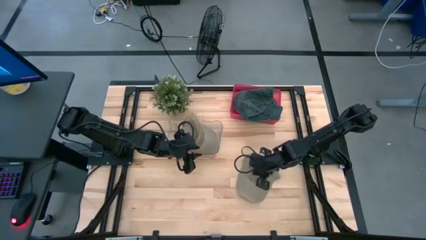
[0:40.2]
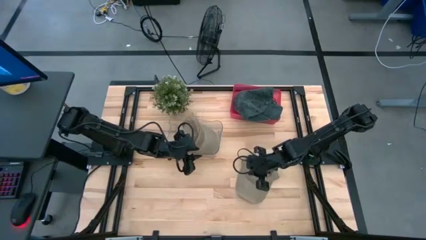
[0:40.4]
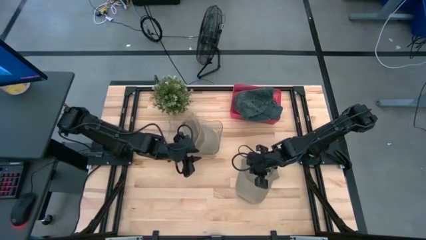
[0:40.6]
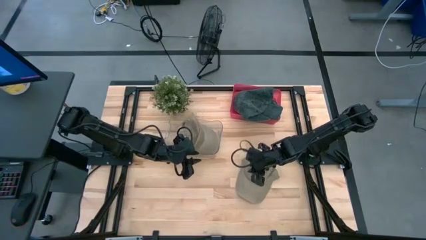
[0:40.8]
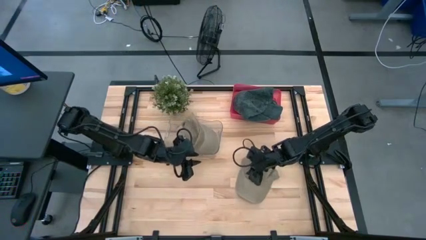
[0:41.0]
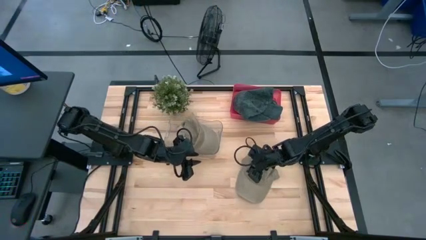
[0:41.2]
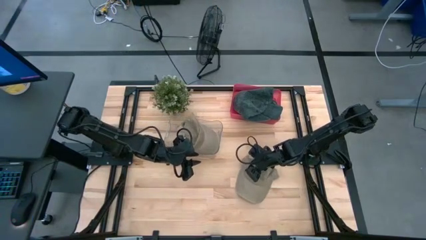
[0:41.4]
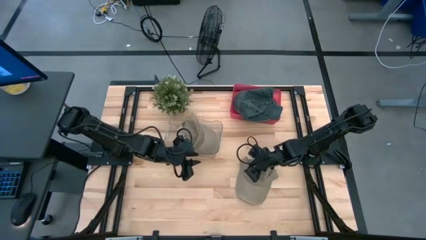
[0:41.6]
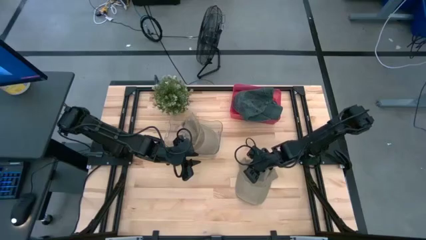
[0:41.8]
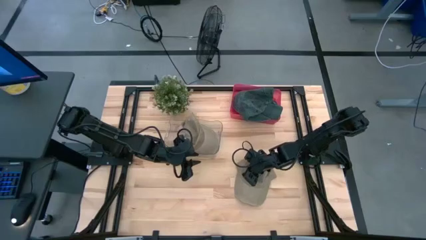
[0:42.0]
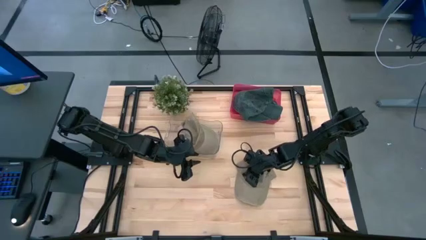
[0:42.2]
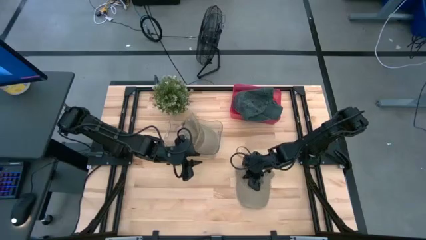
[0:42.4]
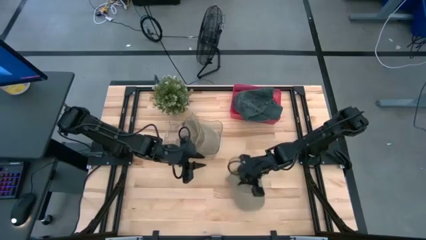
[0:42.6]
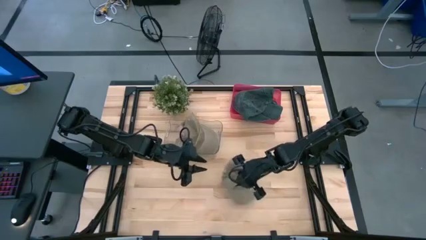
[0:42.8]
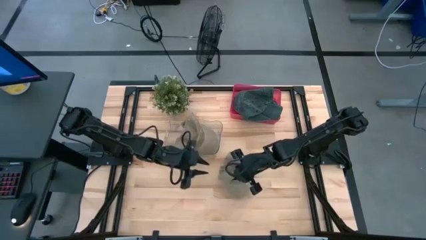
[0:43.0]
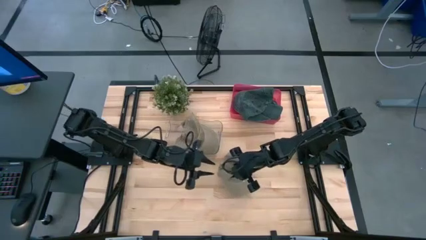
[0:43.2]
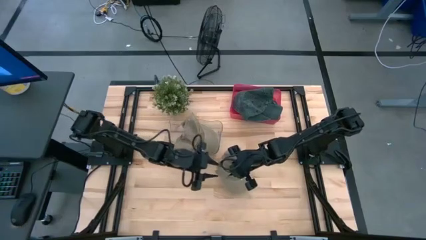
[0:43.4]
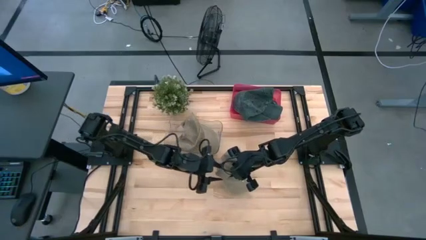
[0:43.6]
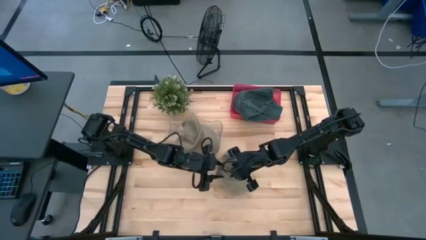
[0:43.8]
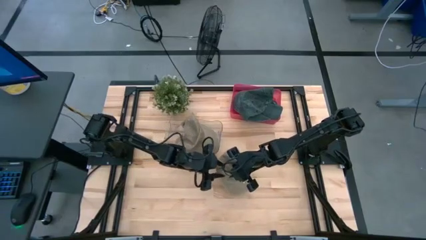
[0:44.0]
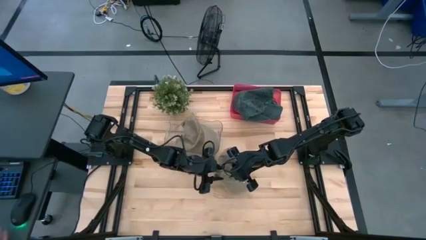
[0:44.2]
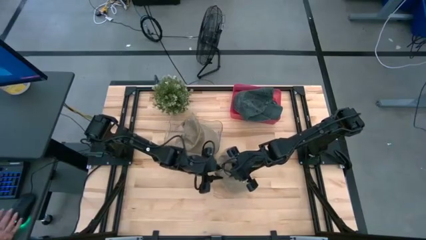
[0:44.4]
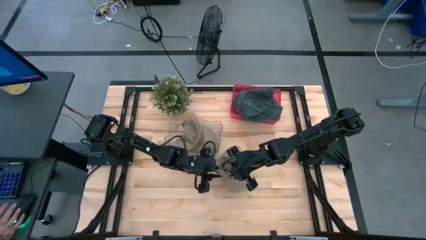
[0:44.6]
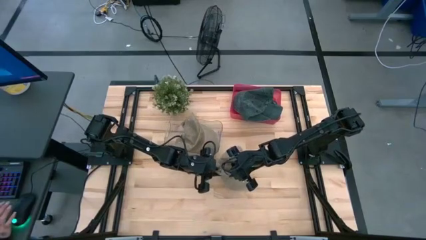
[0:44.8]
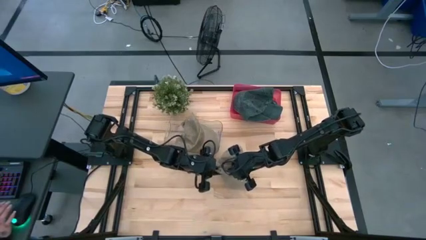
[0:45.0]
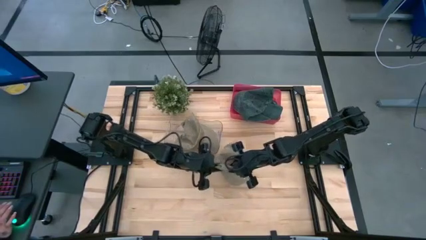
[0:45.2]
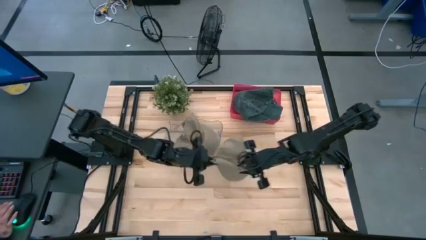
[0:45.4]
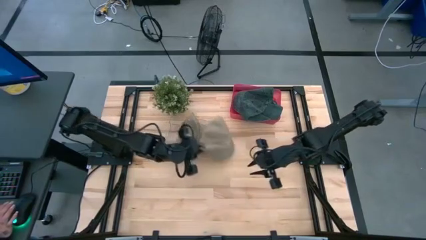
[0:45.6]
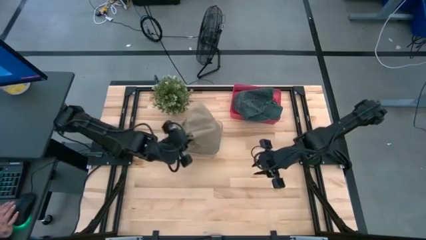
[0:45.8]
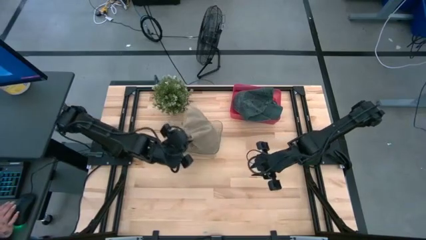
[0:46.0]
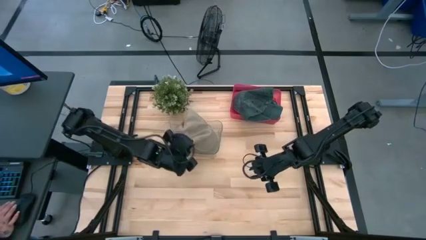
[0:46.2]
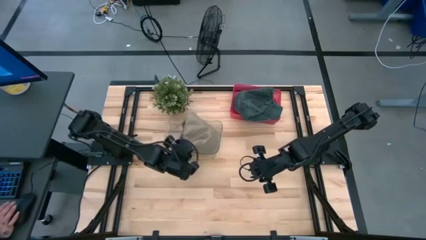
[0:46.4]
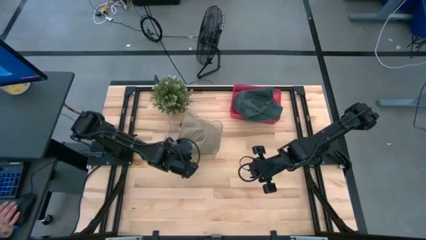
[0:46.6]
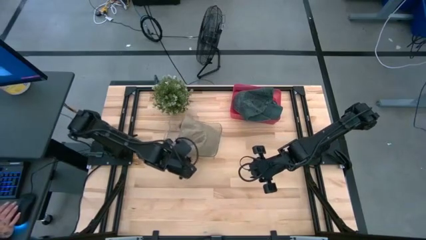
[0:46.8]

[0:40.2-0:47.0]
Task: Pick & Place hat
Put the brown cap into the transparent bin

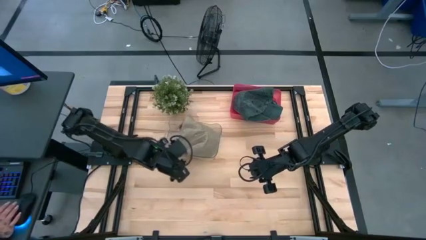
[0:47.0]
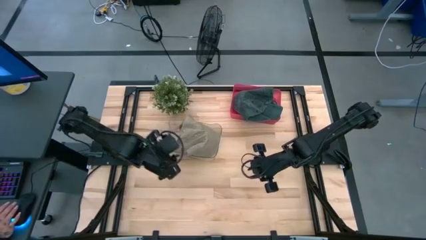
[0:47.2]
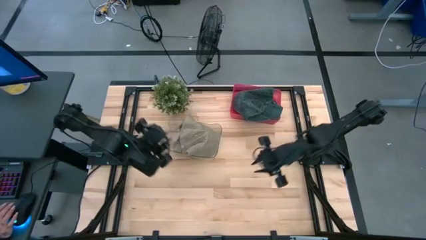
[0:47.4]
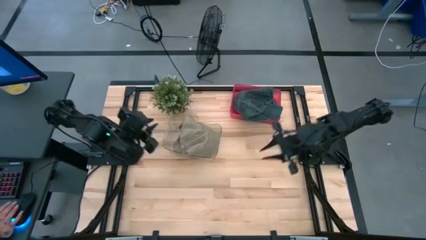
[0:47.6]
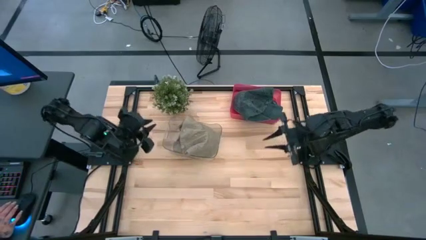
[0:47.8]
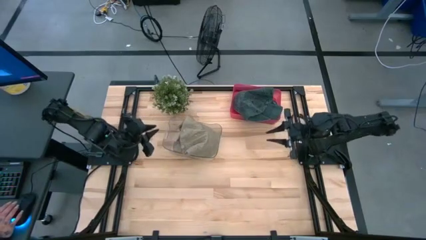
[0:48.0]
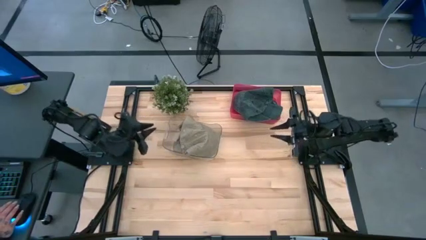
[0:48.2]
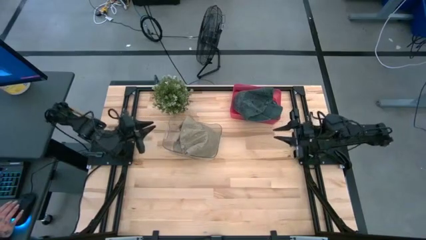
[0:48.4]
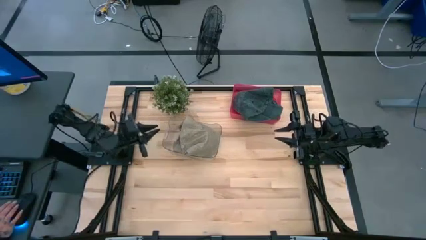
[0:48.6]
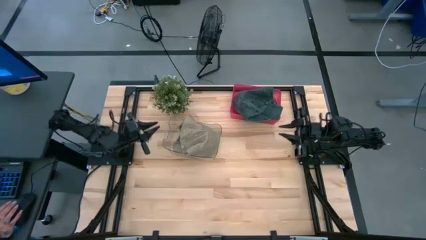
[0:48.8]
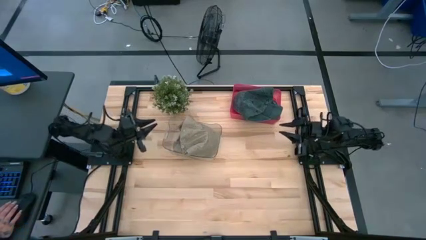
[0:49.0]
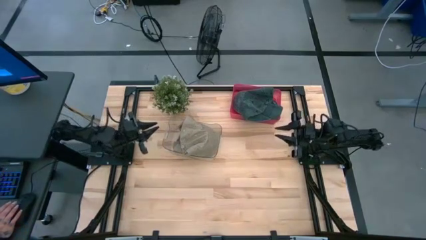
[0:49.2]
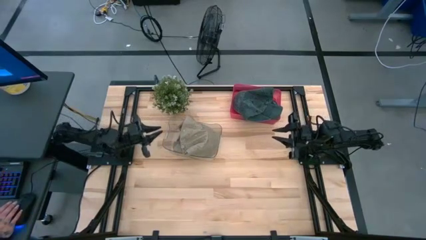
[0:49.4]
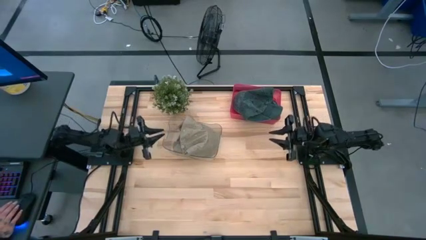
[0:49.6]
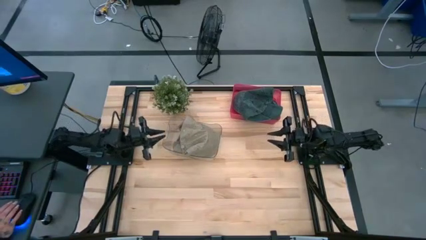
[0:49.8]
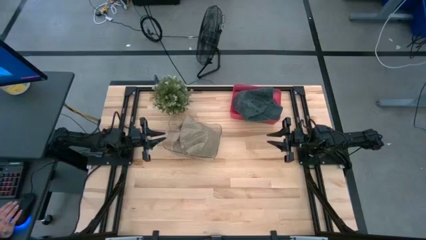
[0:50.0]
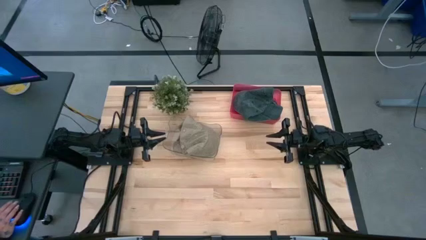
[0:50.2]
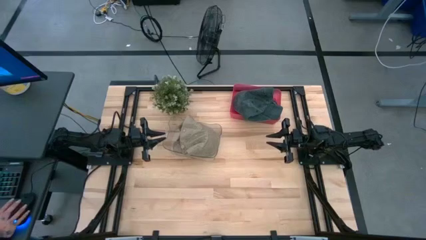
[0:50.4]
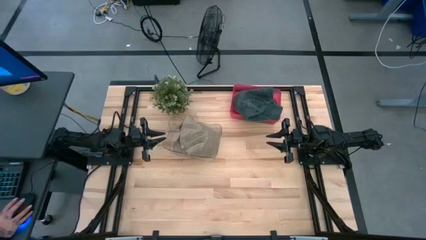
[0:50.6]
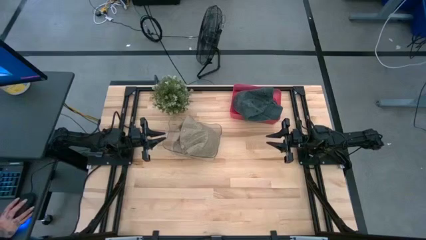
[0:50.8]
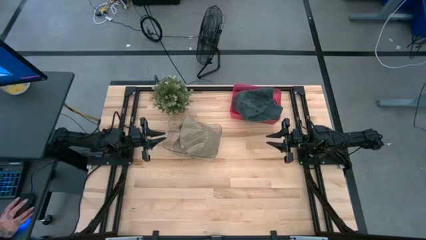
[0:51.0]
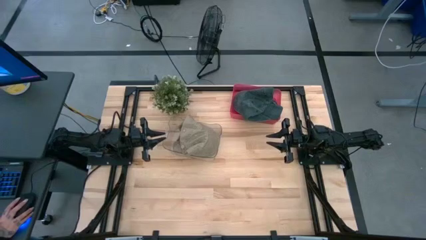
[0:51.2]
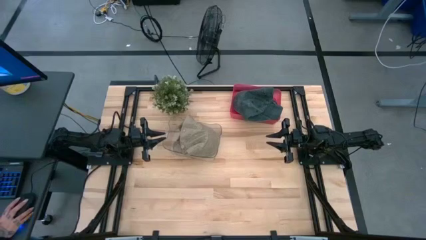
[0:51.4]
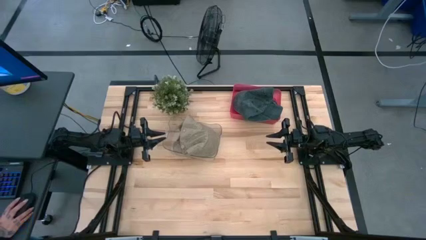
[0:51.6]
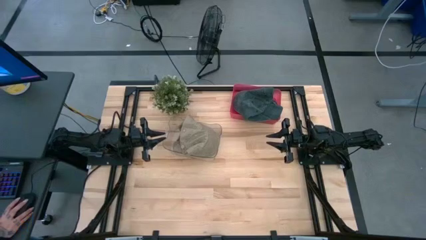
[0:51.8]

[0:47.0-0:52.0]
Return to Home Position

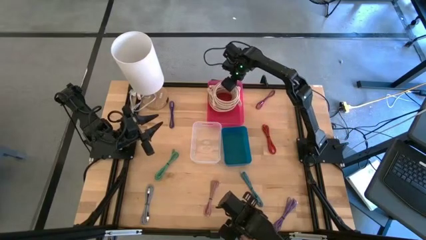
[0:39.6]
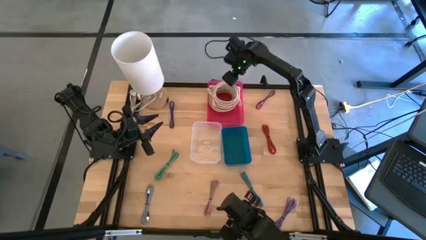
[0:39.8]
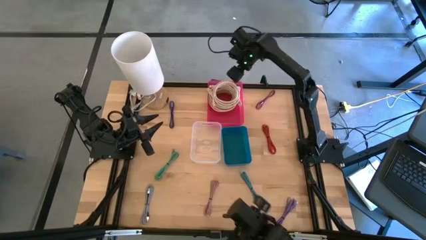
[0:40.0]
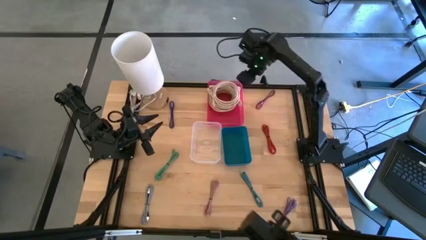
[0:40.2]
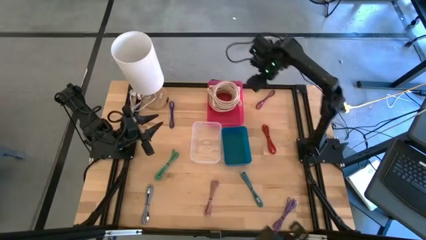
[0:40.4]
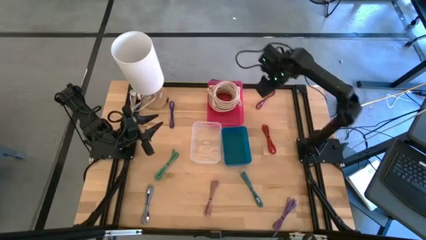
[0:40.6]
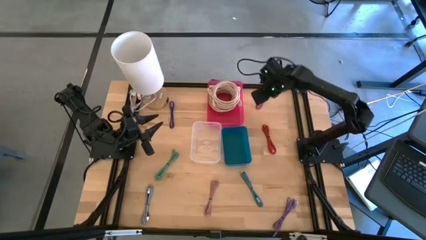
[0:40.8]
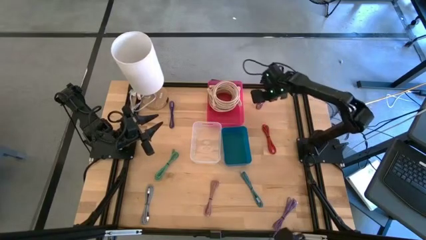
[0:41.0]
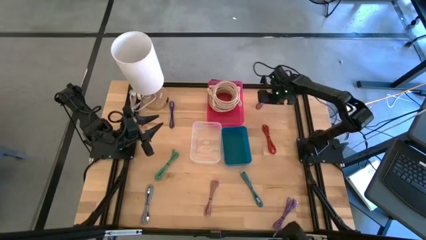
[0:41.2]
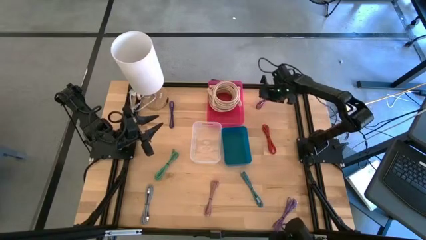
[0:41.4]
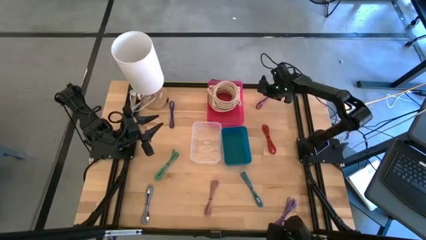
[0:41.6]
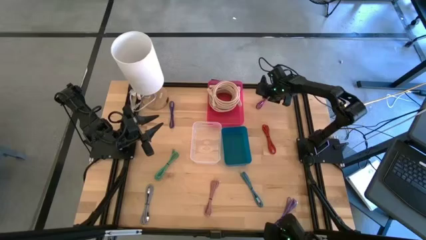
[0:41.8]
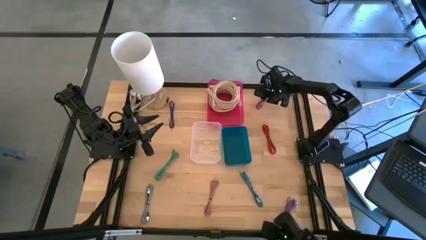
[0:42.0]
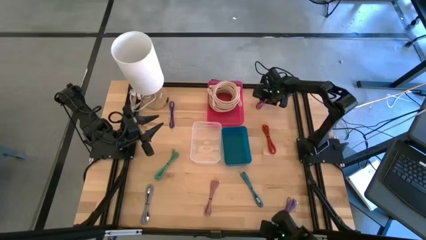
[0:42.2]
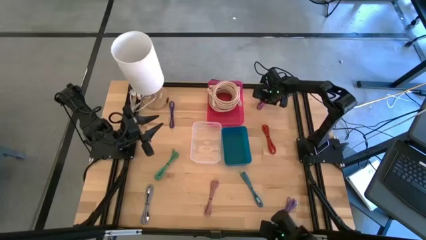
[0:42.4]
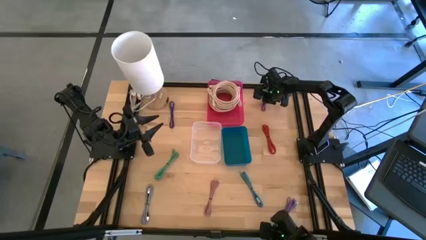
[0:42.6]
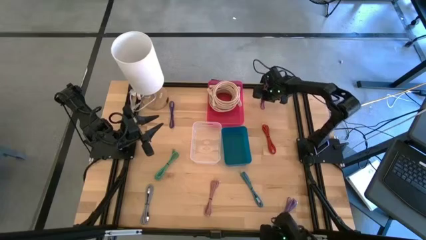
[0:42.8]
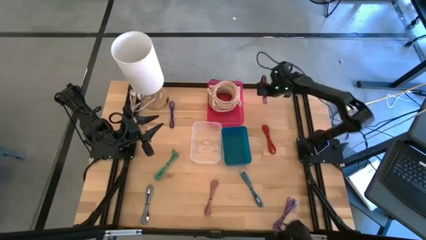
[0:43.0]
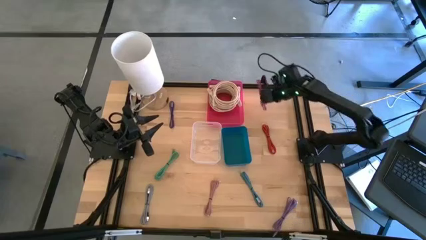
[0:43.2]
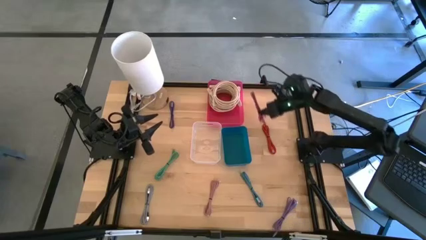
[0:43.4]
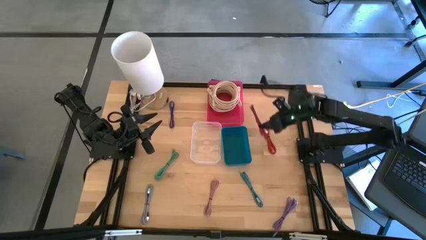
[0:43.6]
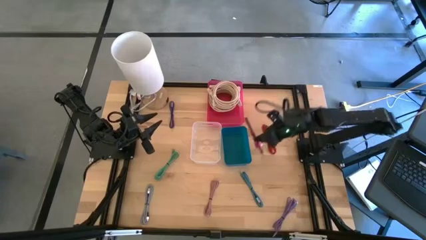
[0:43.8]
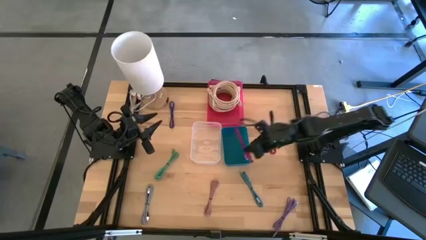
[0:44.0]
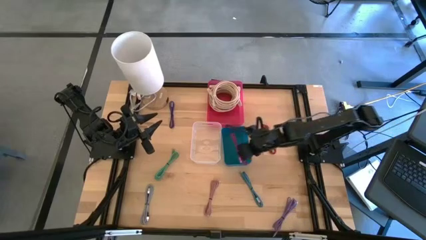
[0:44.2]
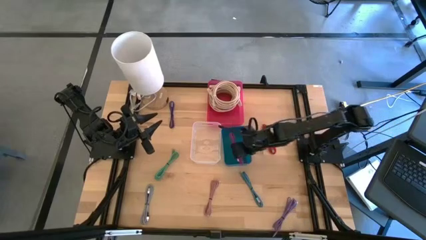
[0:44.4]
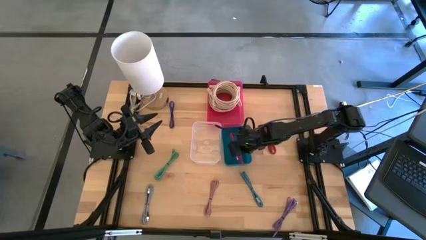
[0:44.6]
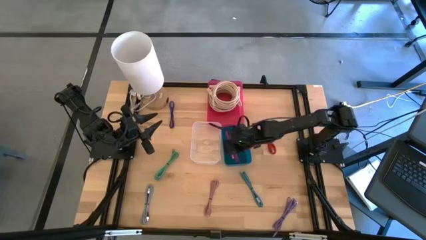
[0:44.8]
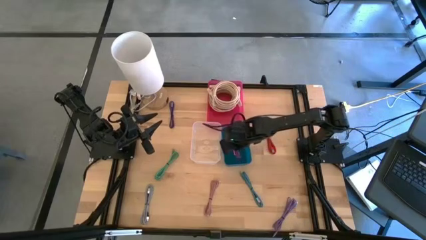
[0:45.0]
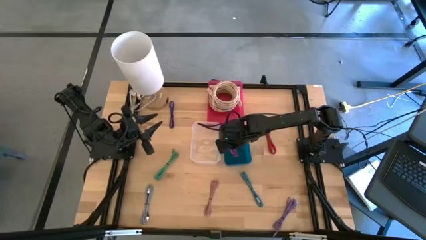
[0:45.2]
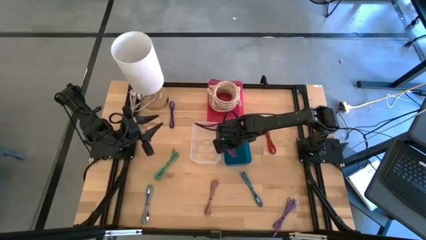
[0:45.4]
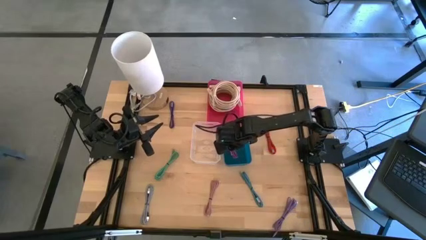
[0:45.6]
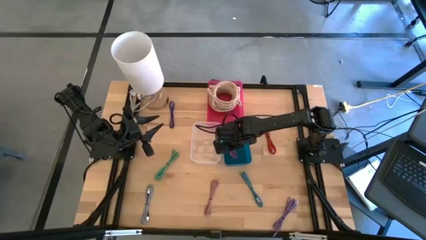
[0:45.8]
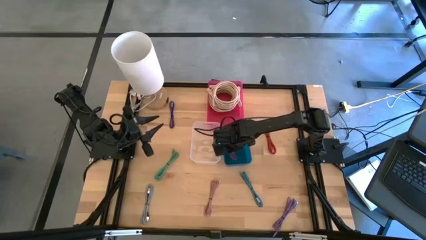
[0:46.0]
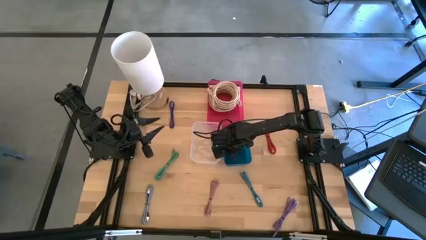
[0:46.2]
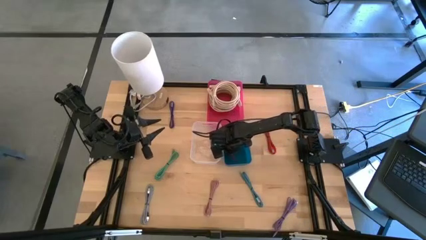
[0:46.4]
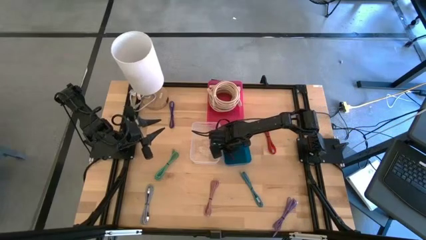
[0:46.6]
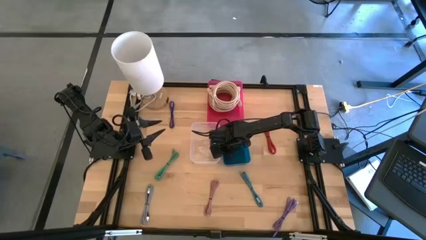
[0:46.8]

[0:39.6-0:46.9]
Task: Pick & Place USB Port
Put the pink patterned charger cable into the blue bin
